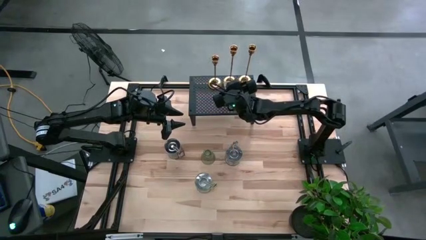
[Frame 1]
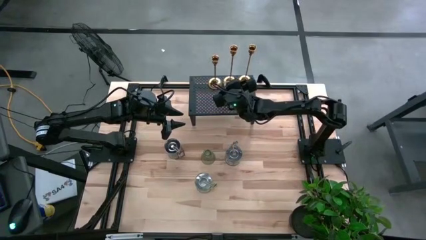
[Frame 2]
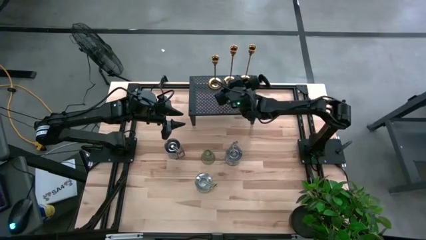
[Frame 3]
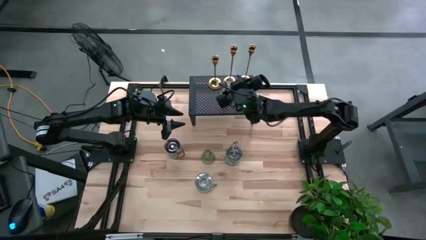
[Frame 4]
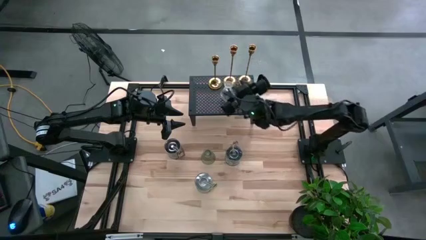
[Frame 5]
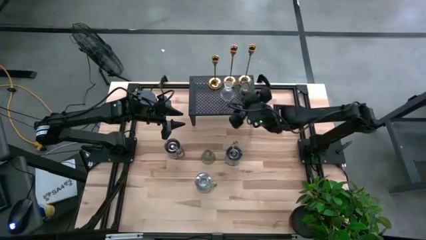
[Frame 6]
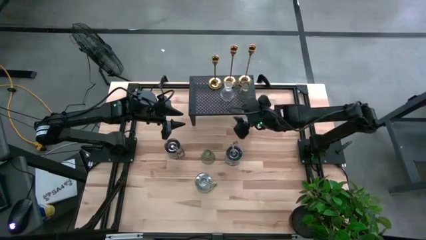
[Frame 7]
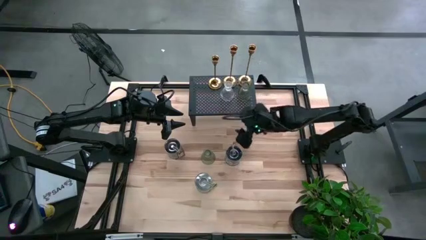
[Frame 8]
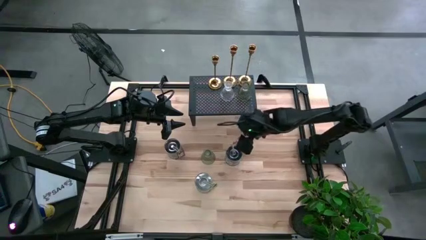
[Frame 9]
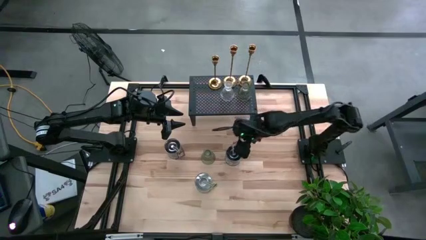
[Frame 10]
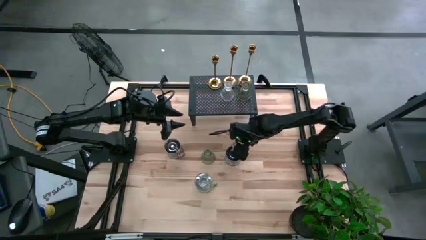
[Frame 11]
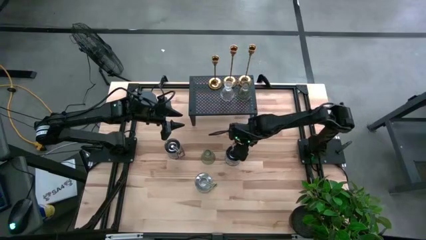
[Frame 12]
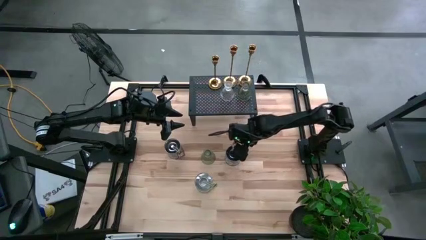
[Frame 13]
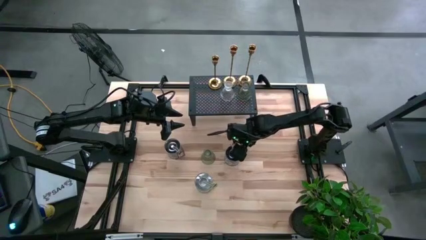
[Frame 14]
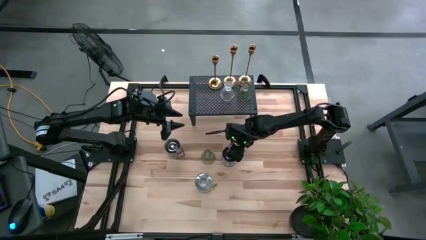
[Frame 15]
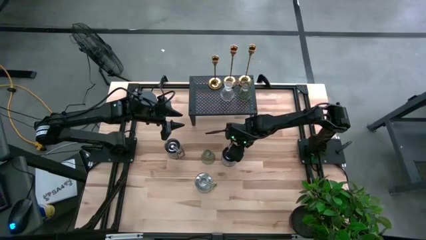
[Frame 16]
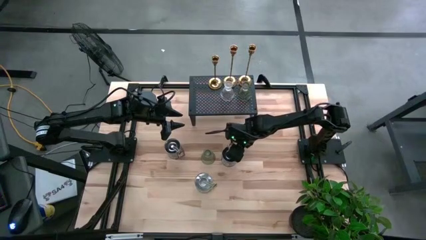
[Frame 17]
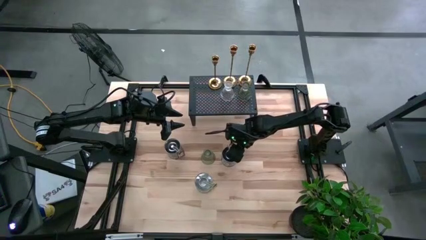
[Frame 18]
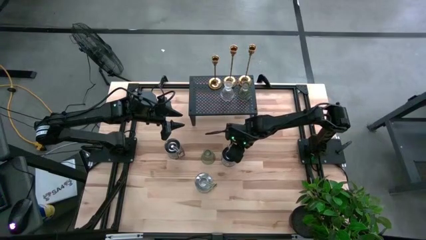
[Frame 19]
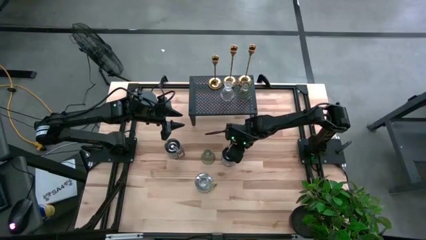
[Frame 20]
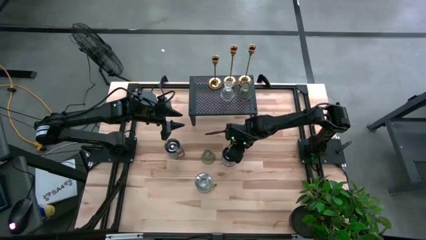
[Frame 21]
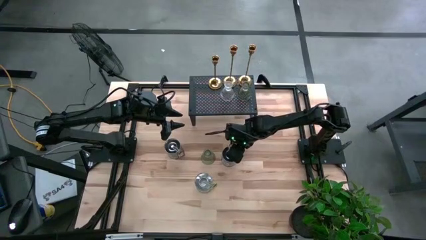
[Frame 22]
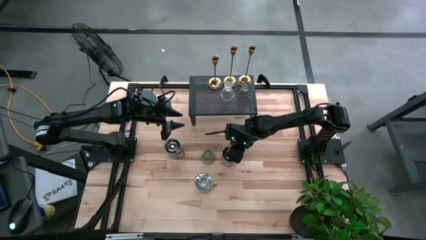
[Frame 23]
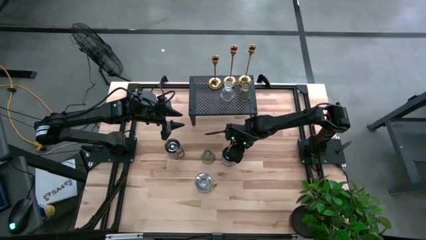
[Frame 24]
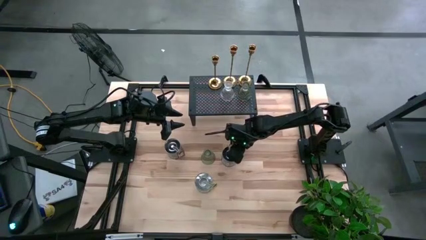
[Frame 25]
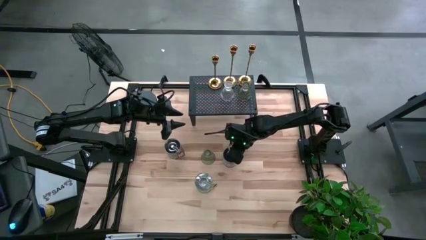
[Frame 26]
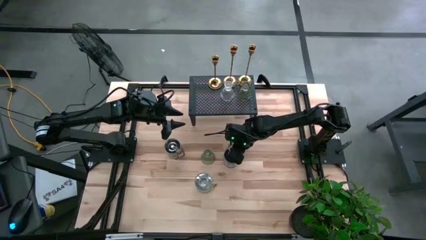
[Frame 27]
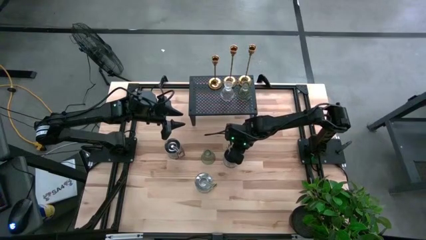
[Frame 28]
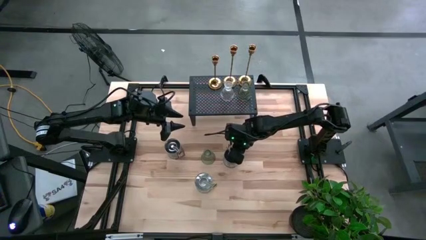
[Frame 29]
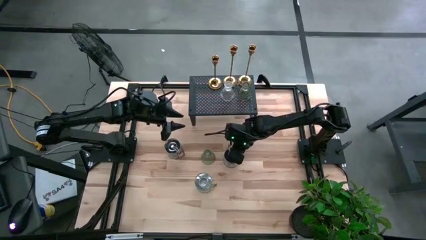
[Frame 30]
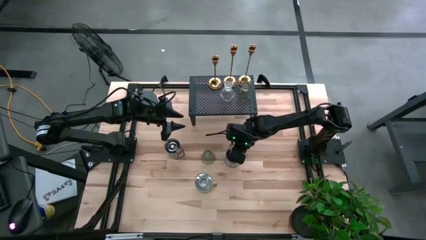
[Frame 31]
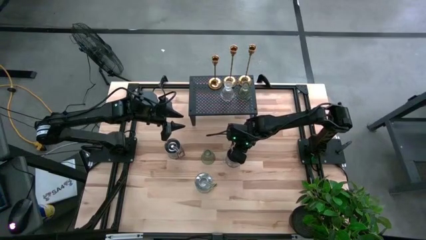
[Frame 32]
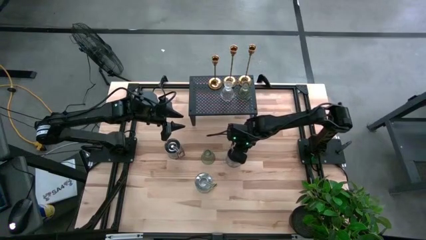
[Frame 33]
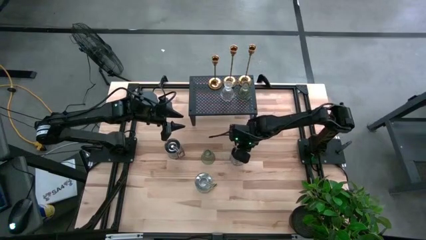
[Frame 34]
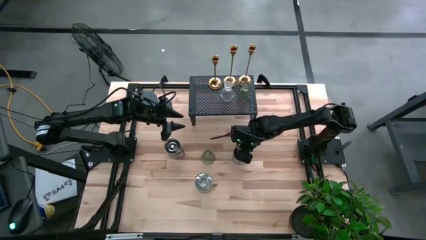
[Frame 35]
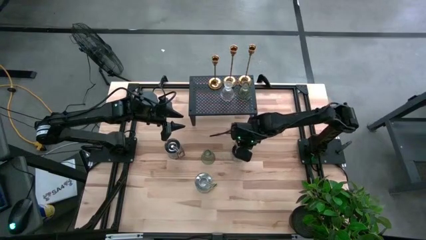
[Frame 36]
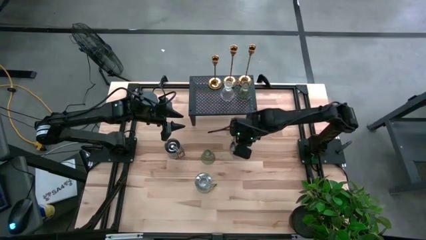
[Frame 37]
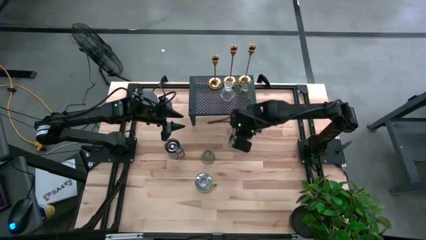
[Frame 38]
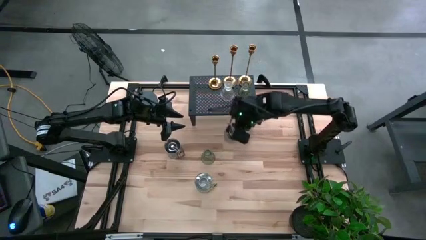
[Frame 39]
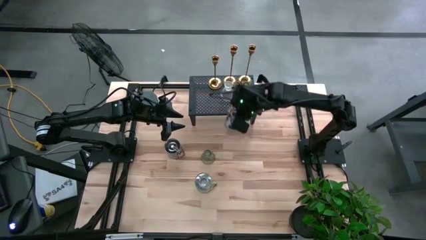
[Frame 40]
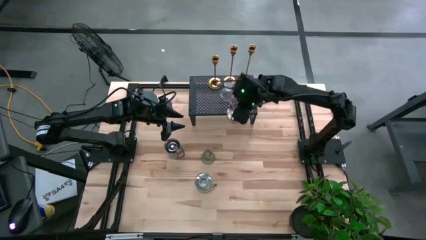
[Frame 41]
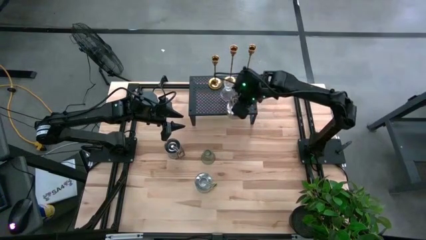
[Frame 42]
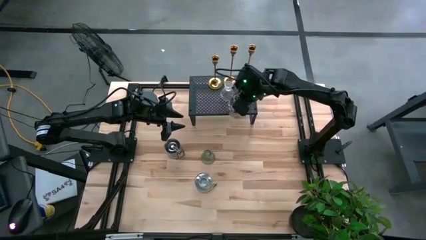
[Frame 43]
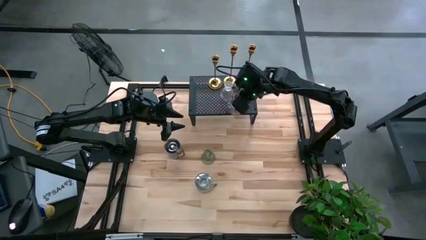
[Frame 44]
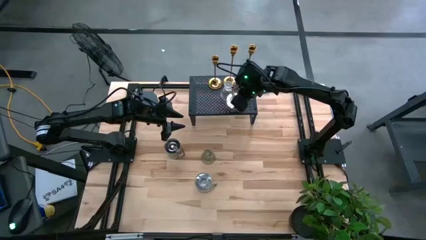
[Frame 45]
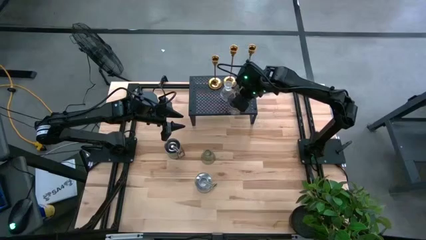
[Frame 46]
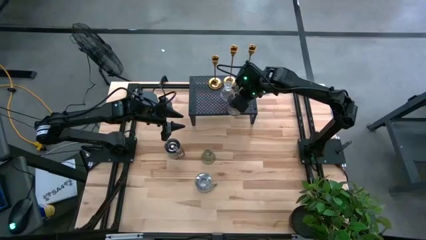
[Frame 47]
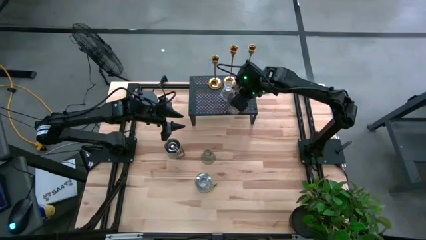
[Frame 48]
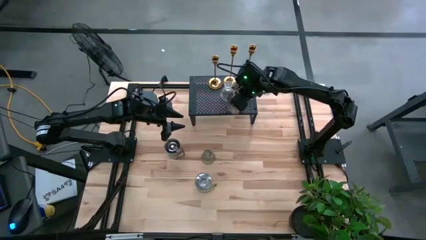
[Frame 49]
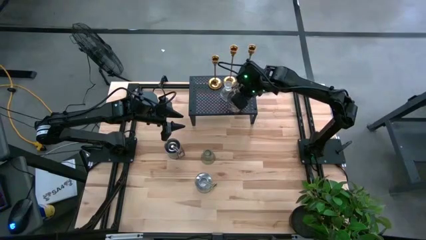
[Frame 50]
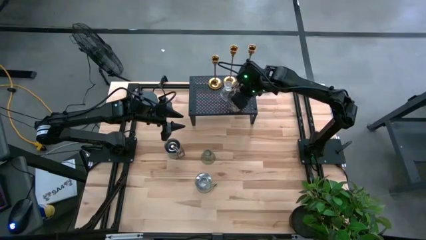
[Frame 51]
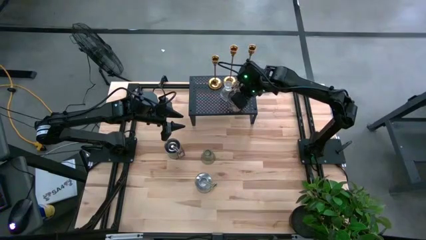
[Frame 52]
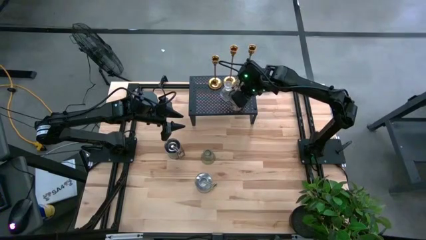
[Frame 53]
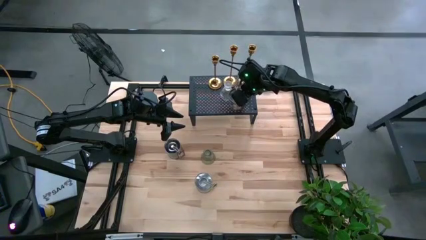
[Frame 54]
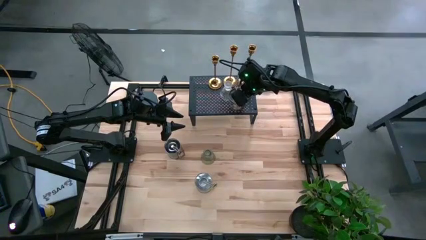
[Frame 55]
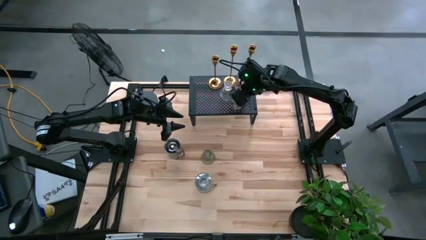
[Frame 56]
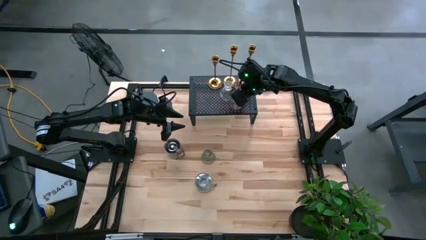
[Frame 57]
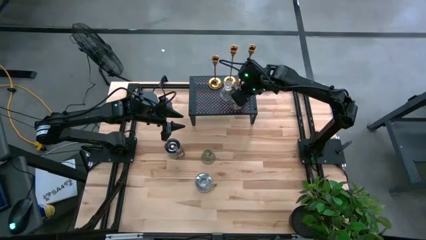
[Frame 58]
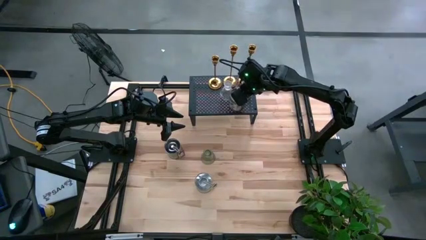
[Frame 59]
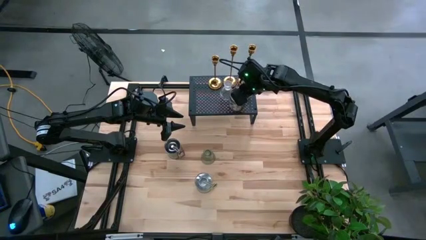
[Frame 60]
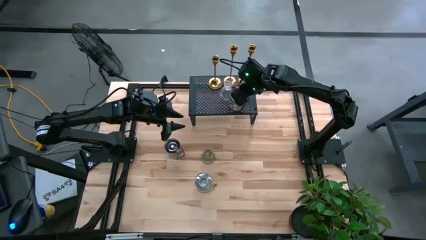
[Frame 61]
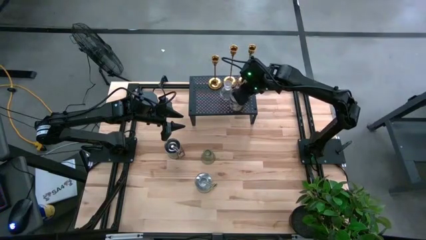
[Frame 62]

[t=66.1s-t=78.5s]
Task: Pick & Place candle stick holders
Put the top right silver scented candle on the shelf
